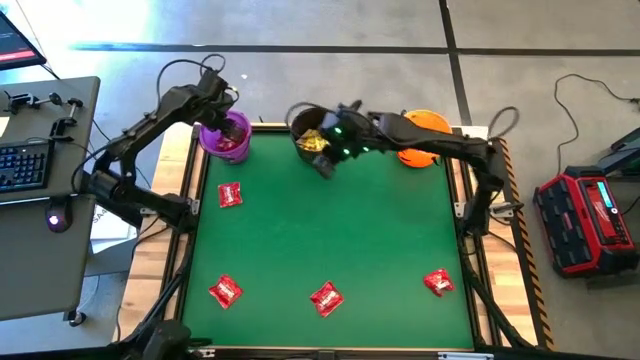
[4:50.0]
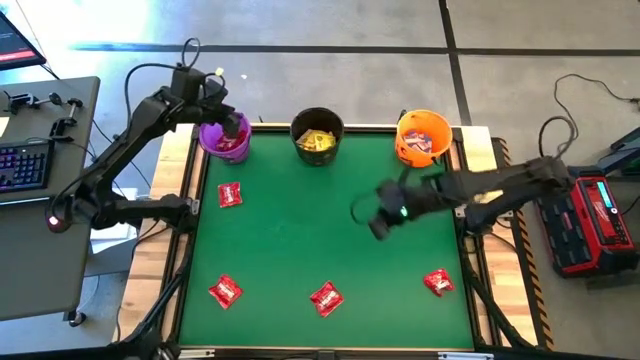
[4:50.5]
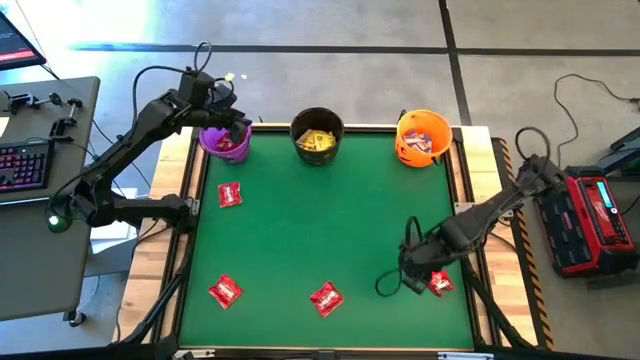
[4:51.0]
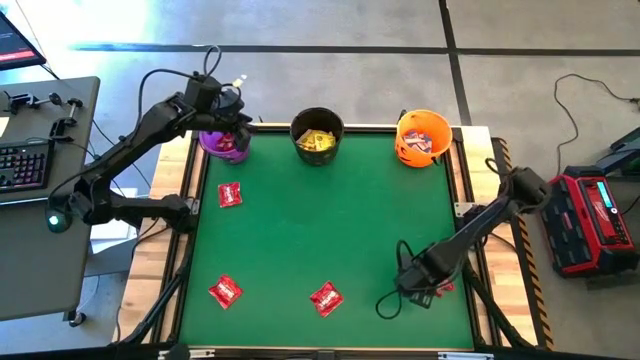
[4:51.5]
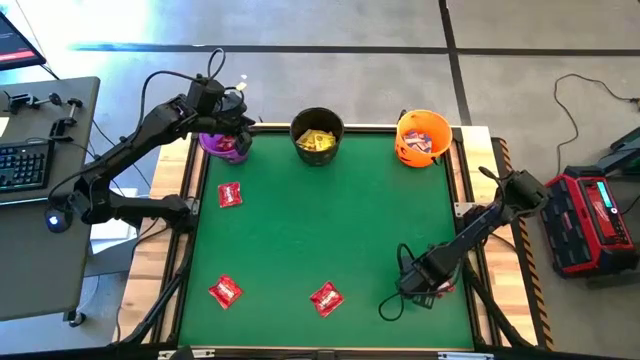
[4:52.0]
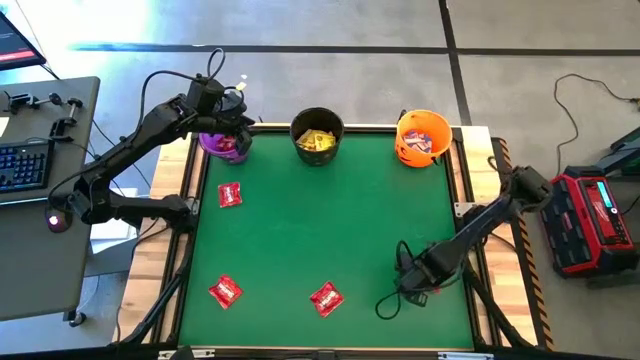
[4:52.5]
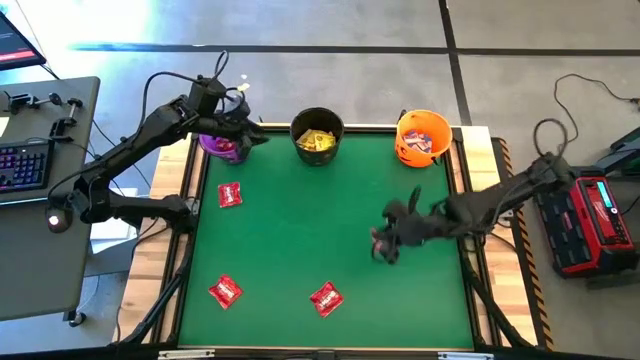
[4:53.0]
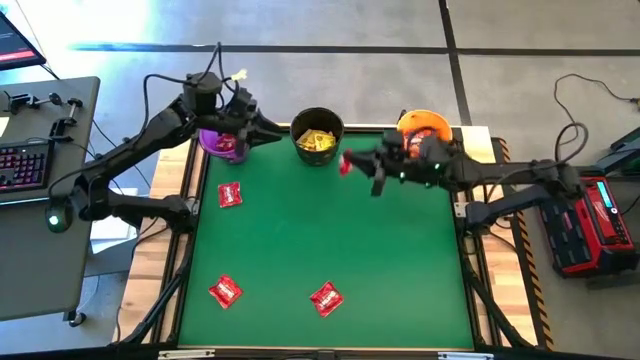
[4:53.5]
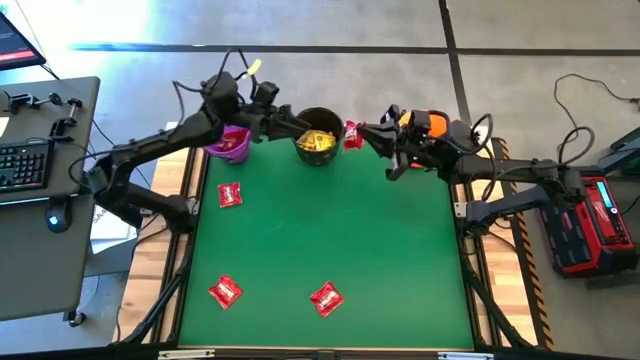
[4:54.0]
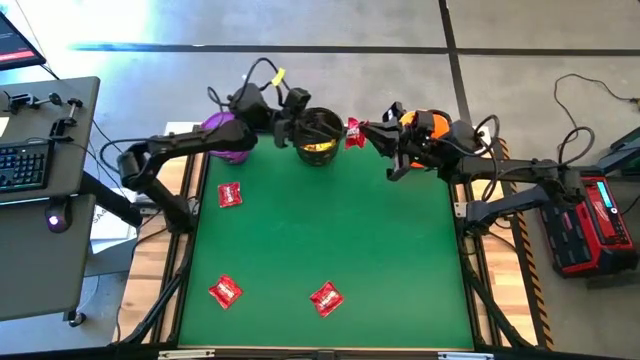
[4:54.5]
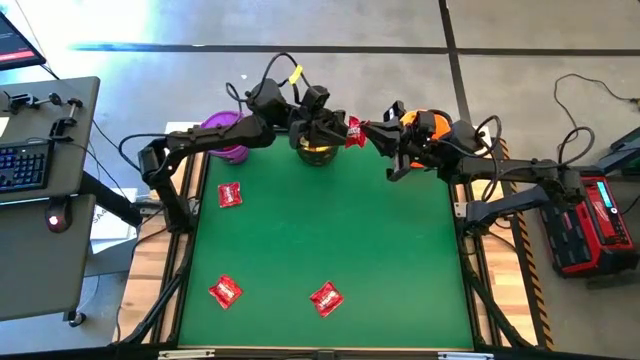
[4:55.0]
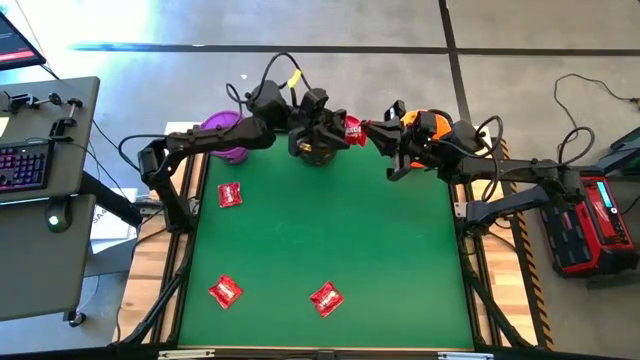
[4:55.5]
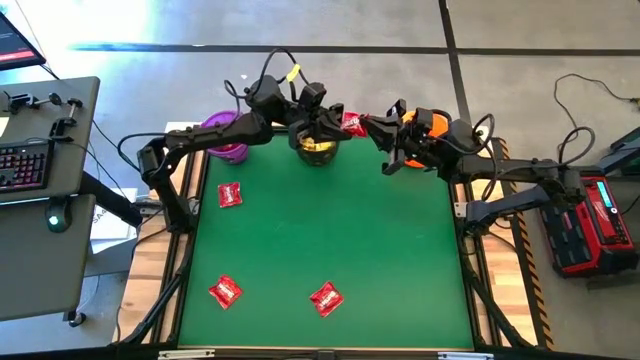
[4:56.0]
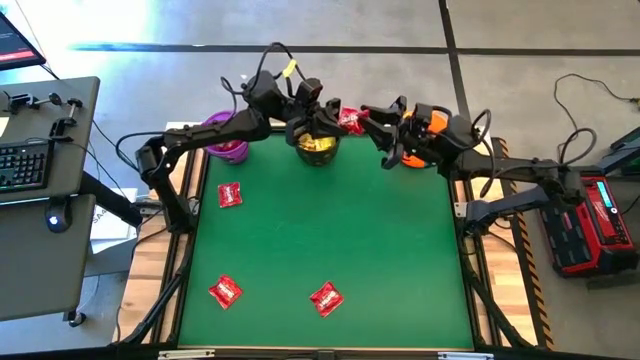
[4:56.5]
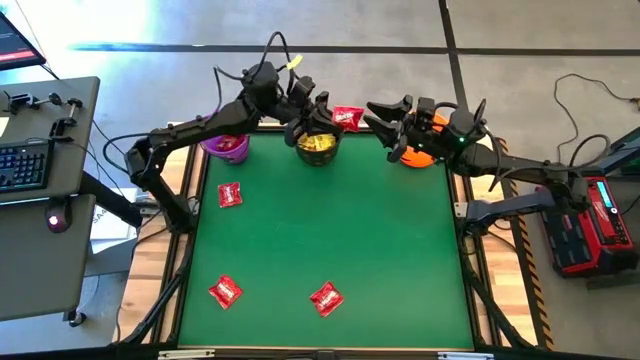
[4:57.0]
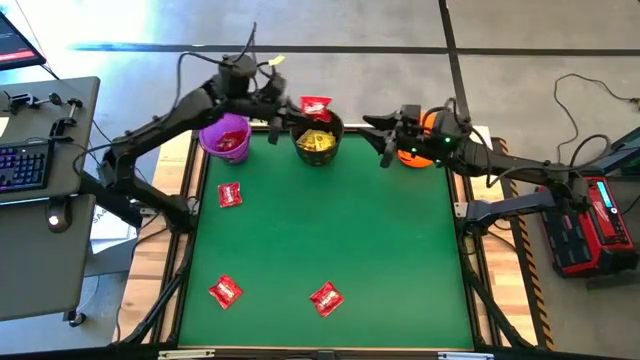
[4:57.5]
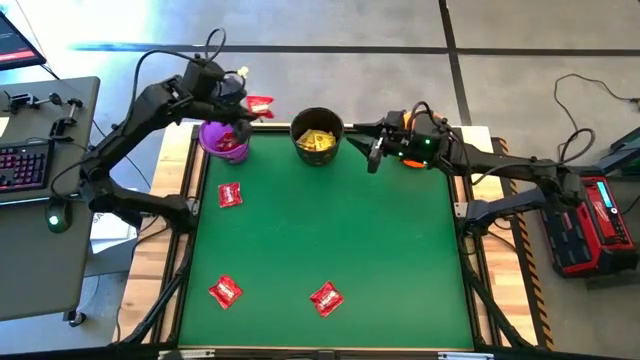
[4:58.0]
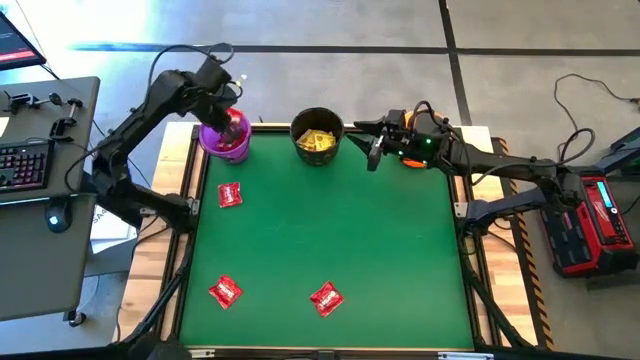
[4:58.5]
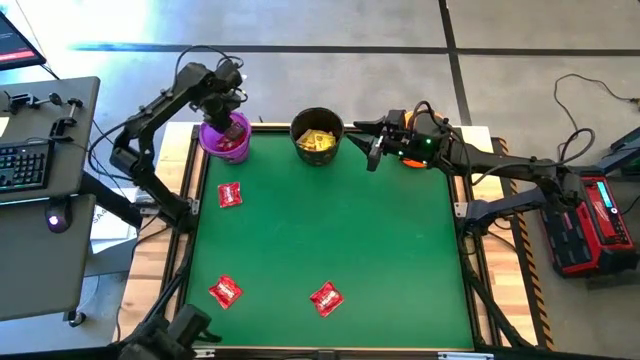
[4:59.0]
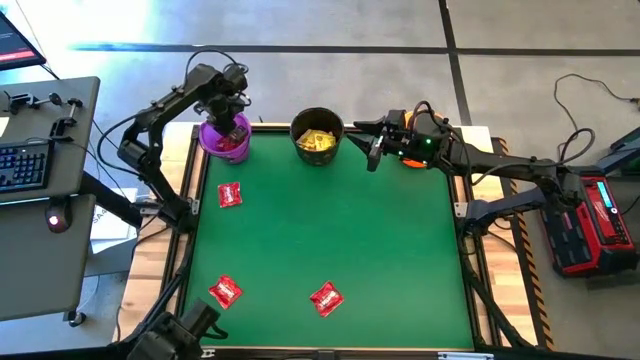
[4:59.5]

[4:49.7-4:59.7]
Task: Sort candy by brand, put in halloween buckets
Put the red candy pack into the violet bucket

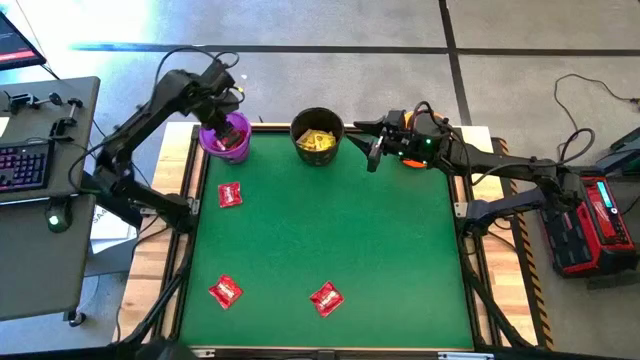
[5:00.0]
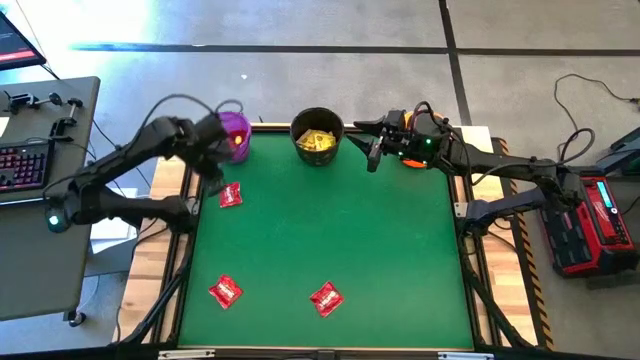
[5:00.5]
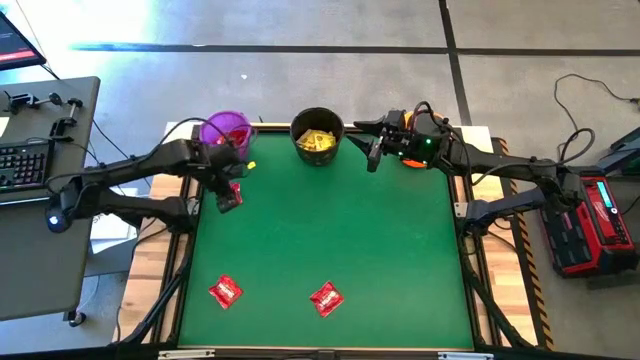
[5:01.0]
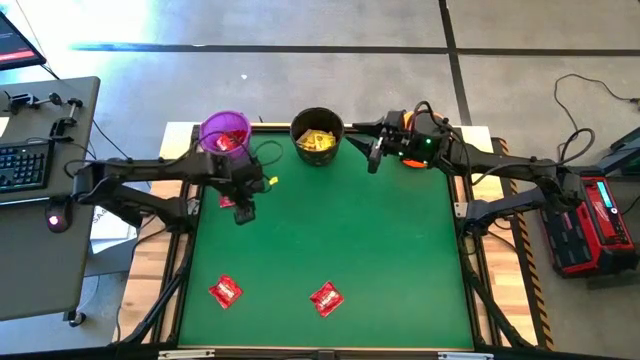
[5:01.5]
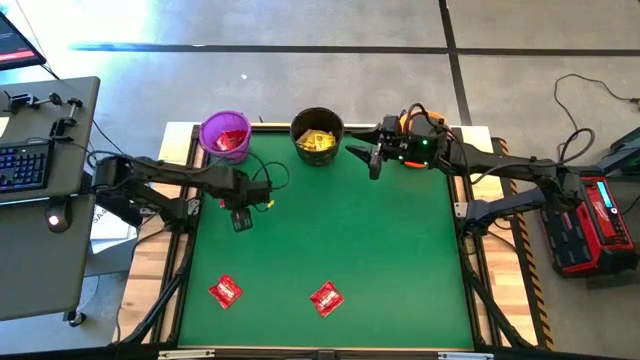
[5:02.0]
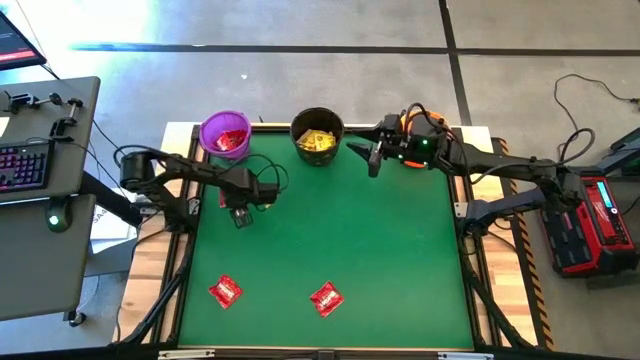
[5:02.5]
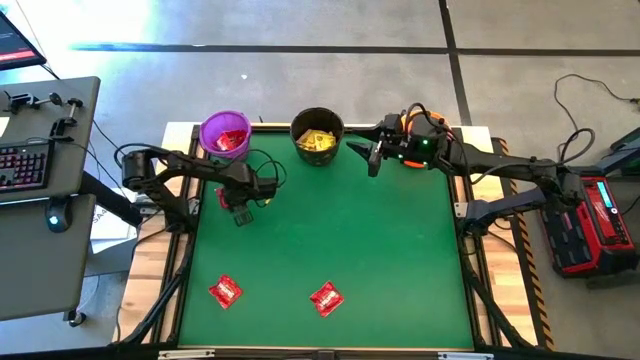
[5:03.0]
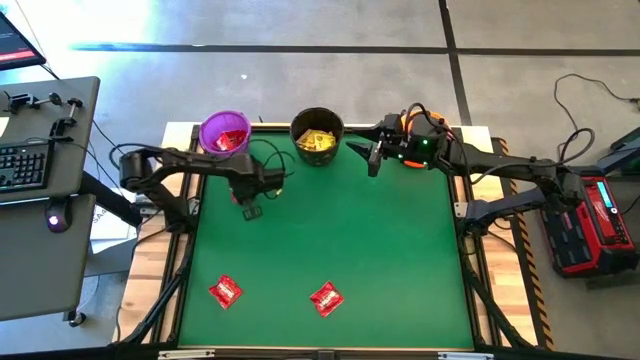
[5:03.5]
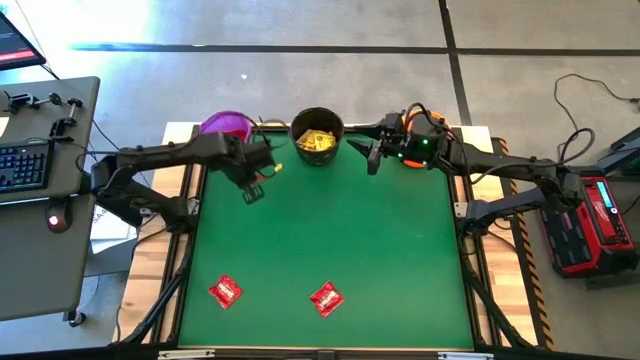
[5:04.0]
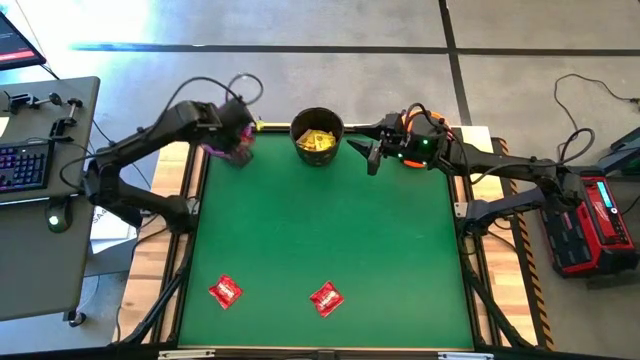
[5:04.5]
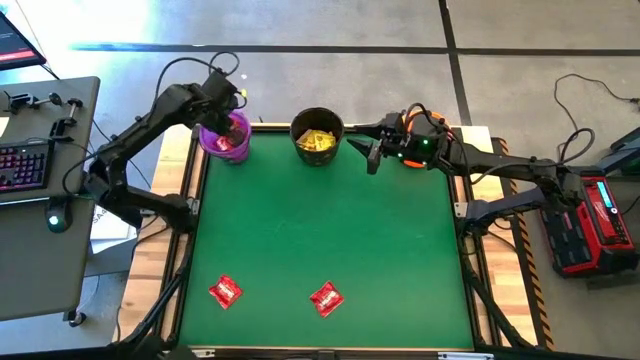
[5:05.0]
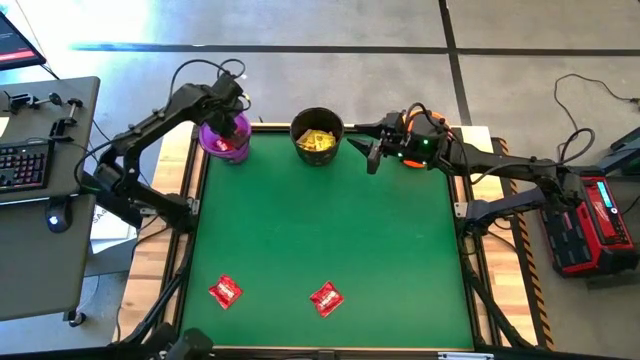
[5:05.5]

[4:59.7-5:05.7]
Put the red candy pack into the violet bucket

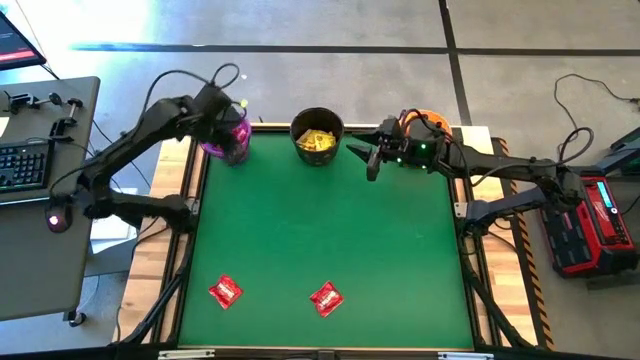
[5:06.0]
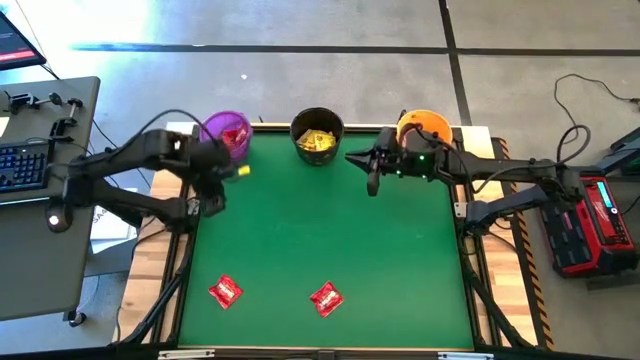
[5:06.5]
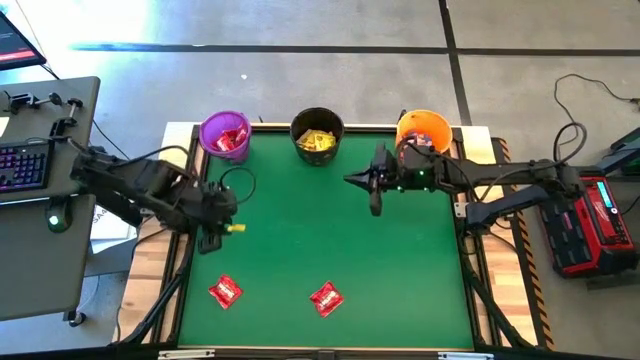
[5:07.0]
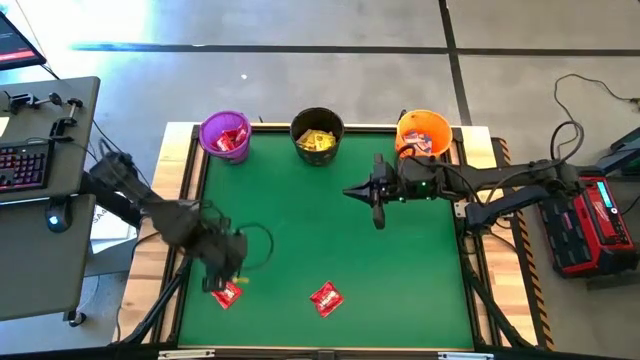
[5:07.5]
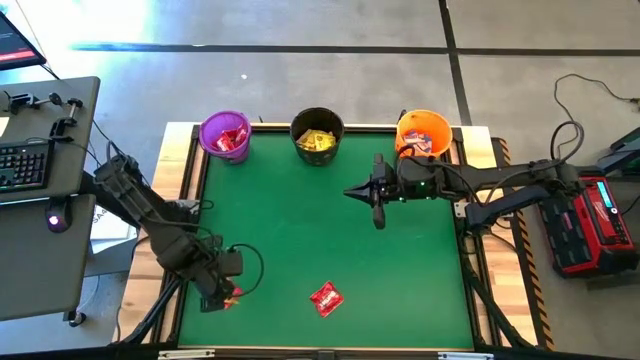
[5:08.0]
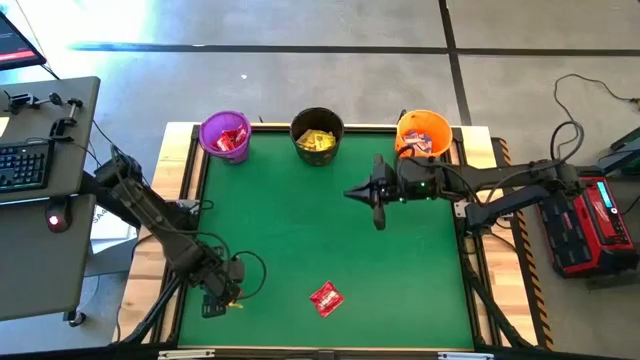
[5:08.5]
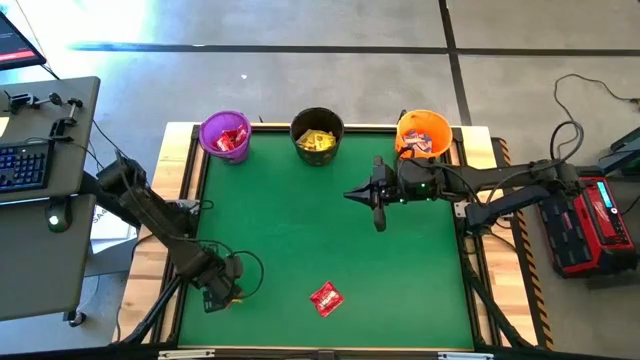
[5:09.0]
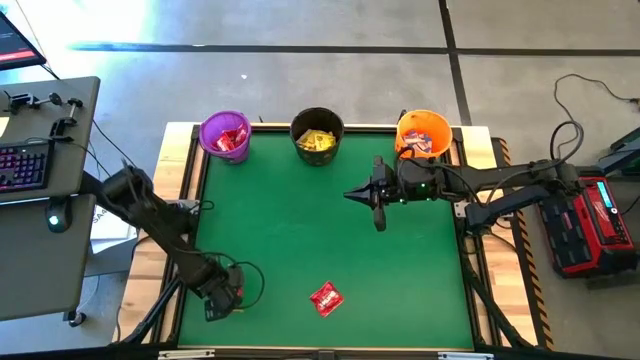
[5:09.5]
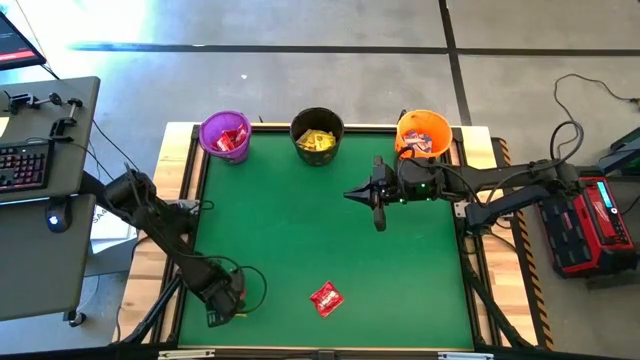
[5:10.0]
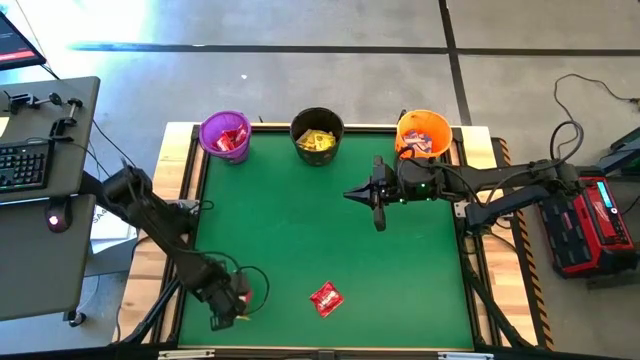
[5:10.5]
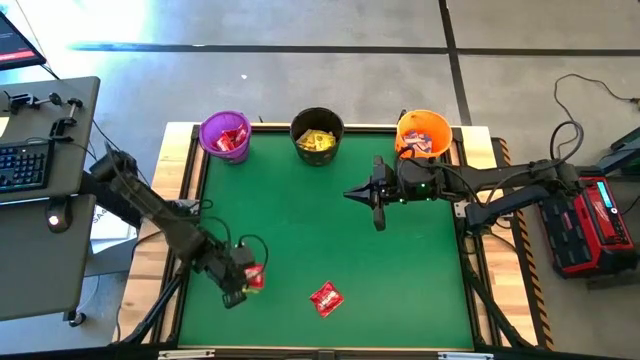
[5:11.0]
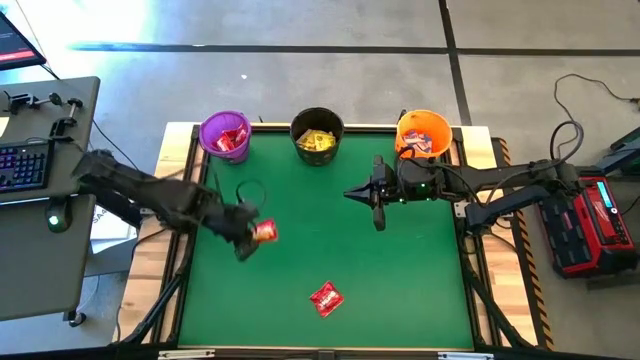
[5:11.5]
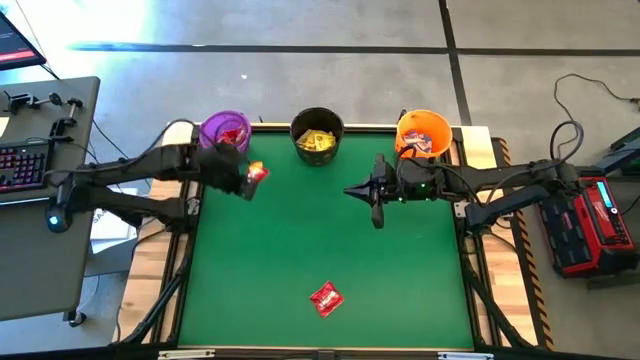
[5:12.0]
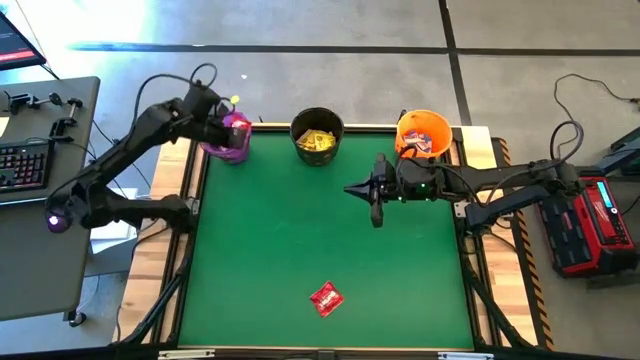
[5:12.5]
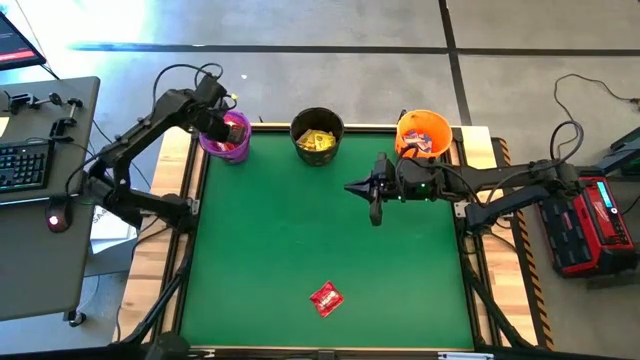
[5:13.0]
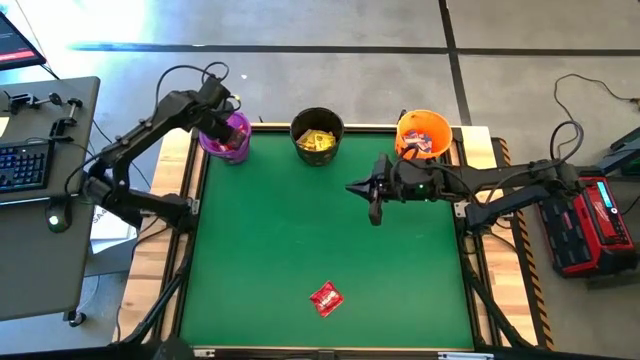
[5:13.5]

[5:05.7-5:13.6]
Put the red candy pack into the violet bucket
